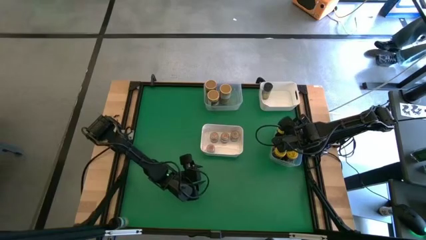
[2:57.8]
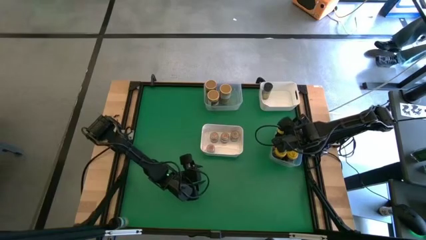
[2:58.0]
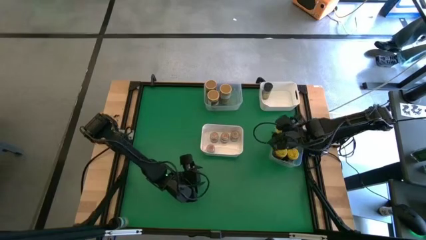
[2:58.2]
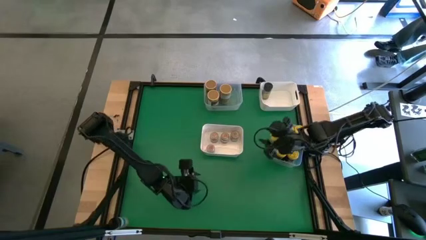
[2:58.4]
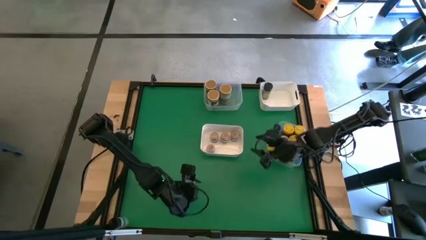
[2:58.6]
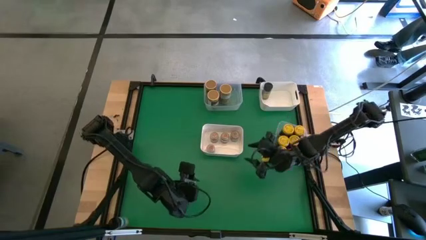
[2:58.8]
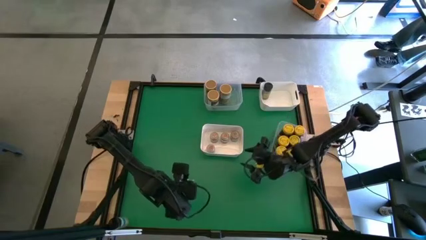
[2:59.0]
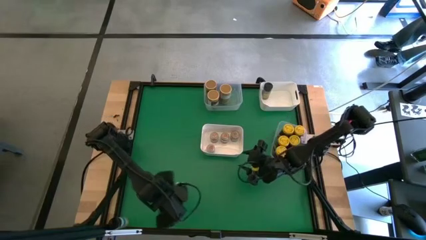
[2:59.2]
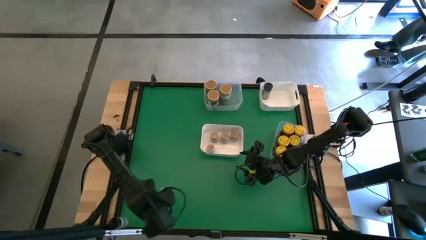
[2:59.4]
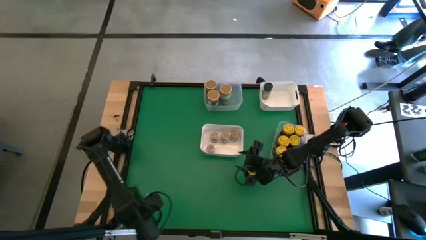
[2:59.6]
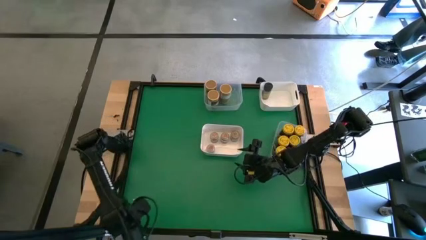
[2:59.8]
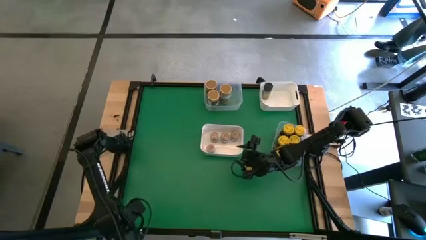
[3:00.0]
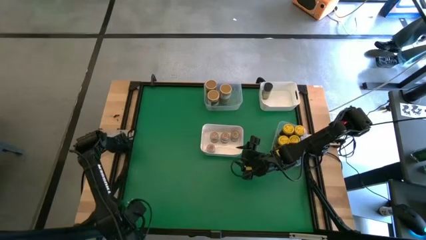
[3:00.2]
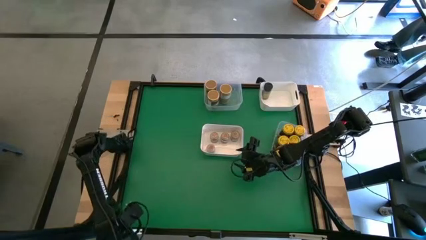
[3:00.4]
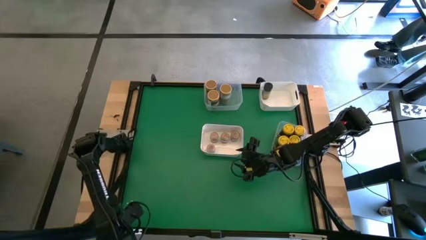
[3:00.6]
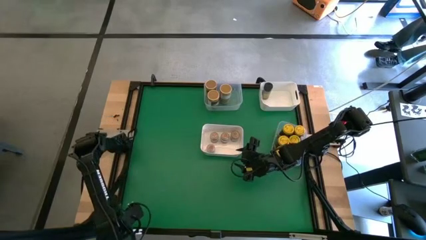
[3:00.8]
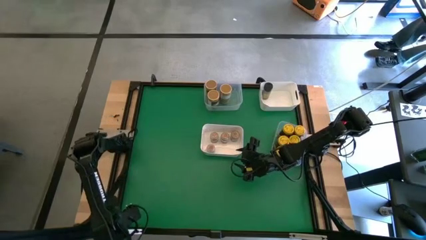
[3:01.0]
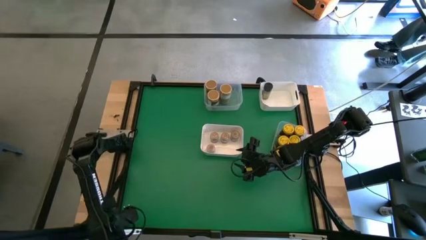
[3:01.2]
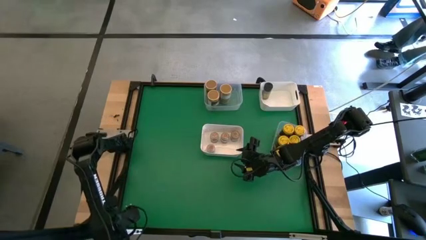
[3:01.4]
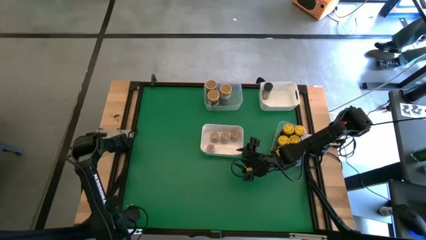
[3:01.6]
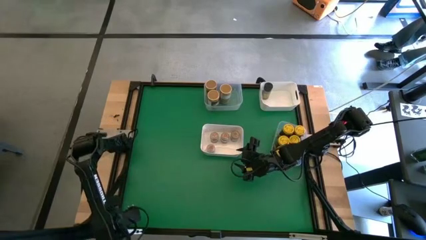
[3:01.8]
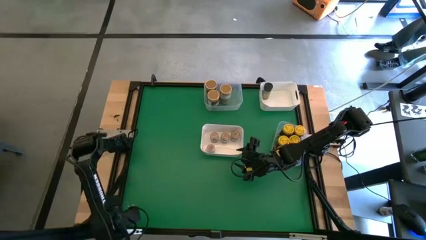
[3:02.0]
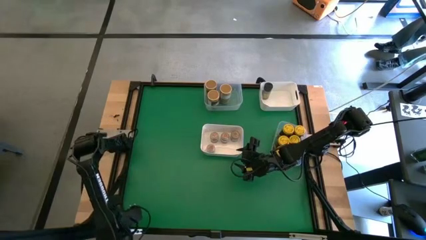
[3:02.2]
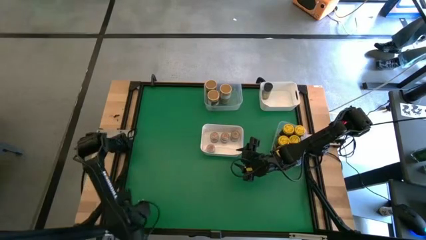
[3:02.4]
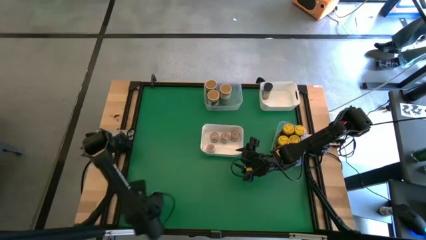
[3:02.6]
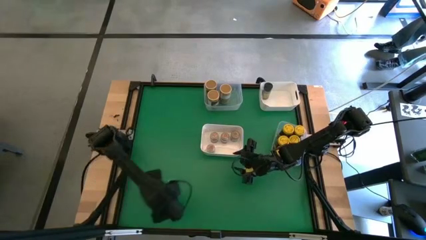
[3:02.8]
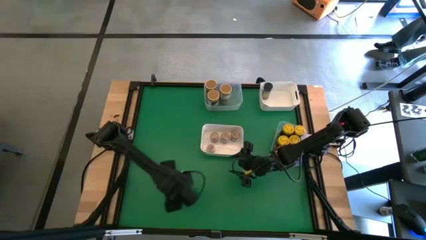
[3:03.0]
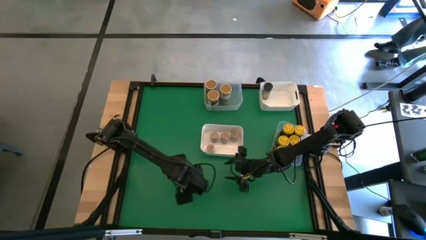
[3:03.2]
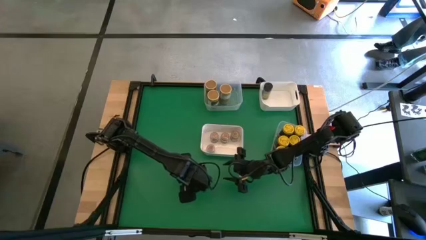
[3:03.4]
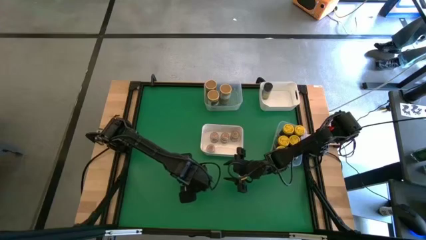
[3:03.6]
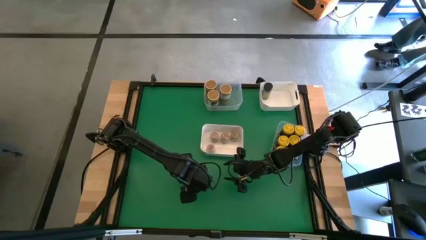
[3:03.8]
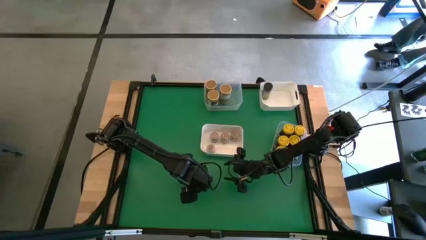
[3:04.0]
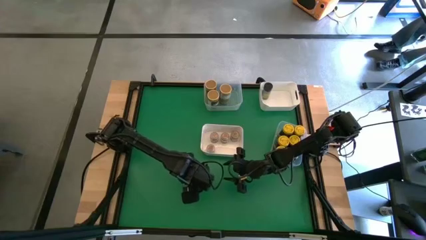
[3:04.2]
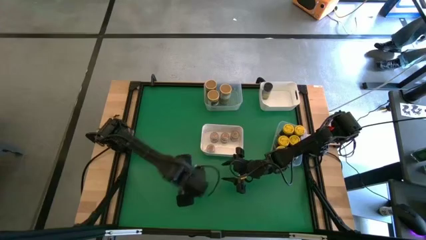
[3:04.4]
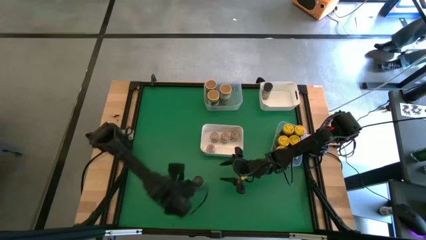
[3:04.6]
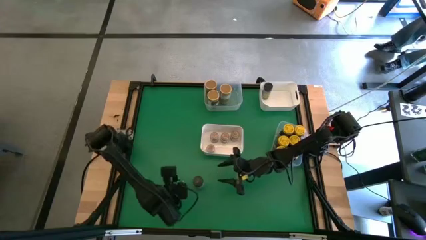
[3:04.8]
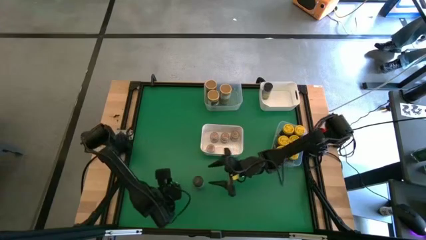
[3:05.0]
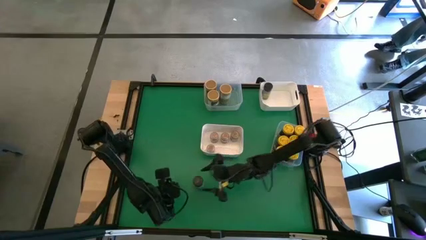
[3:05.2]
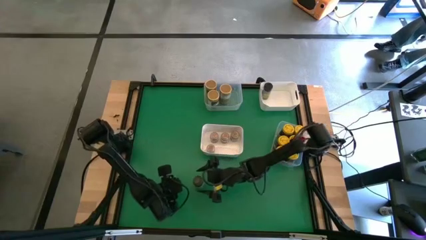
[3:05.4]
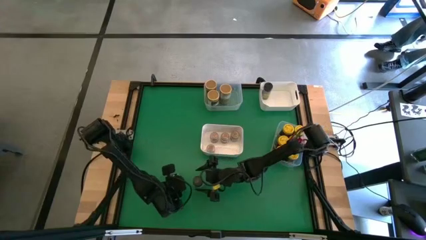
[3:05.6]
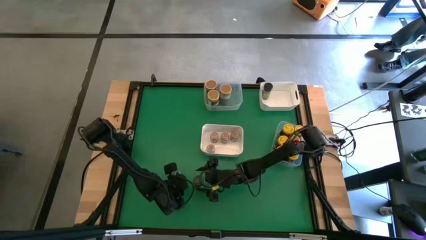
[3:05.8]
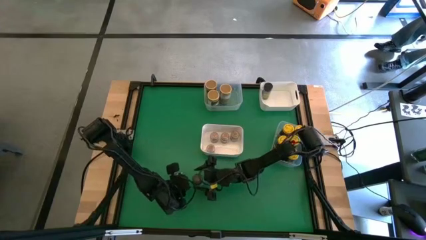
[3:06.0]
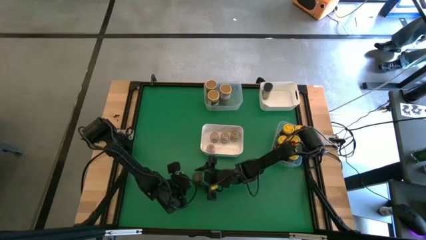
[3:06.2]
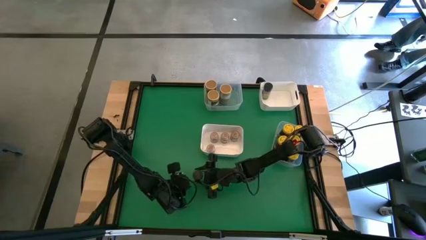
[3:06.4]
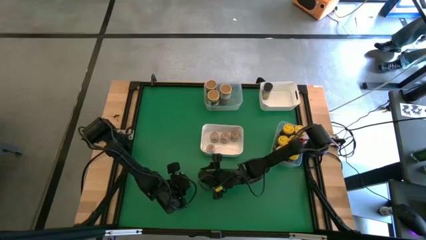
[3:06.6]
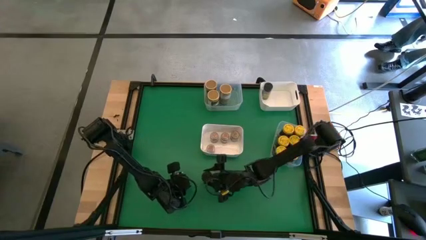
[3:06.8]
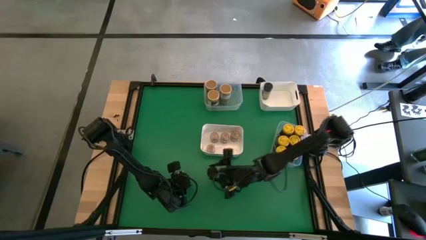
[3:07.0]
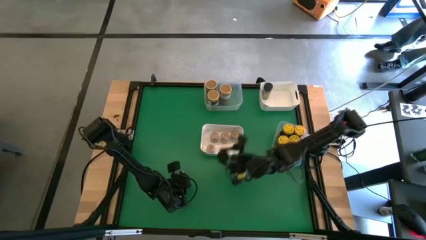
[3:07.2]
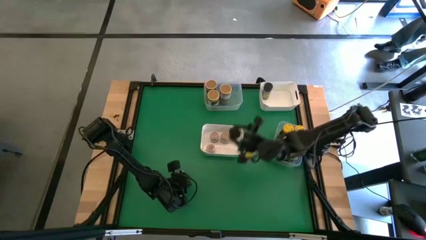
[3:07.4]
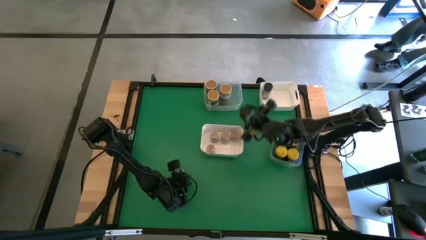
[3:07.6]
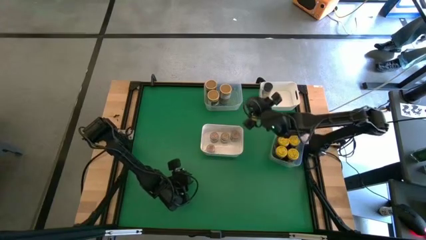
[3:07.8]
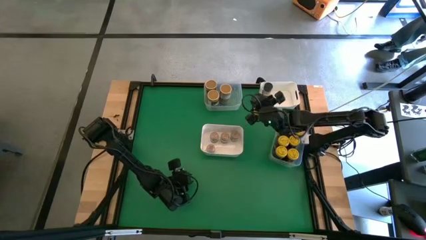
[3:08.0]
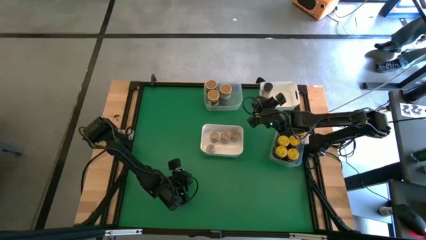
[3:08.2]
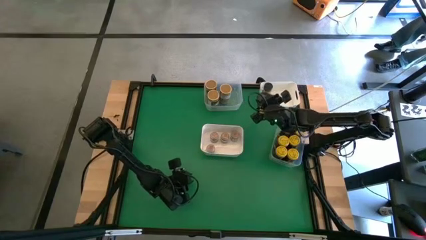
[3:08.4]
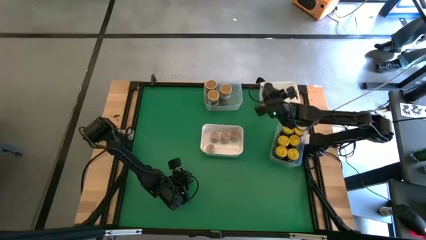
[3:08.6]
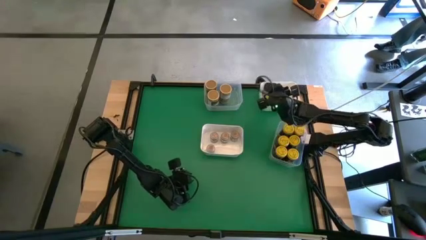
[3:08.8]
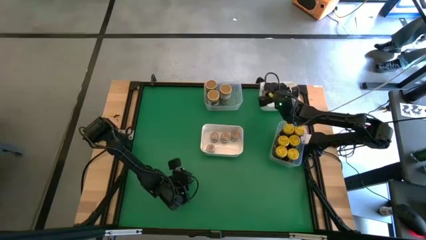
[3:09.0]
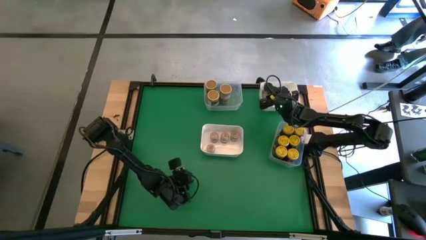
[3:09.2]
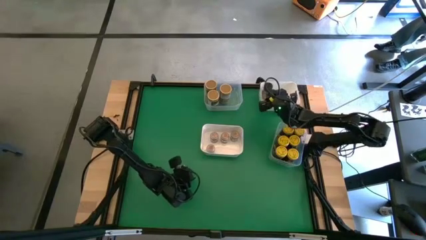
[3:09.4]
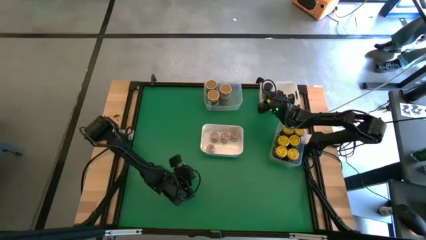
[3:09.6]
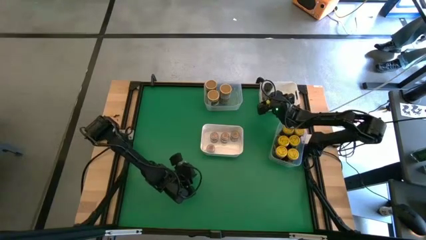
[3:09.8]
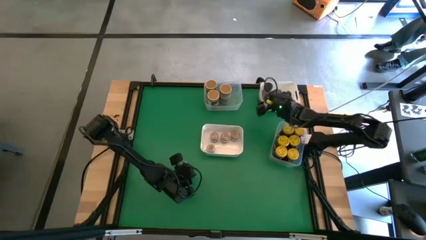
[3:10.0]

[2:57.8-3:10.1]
Task: Sort spices by type
Put the black seasoning bottle into the top white bin

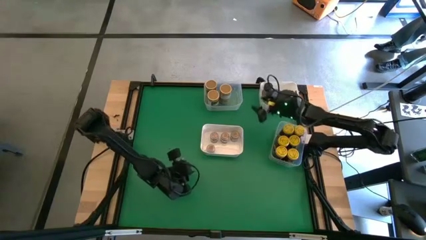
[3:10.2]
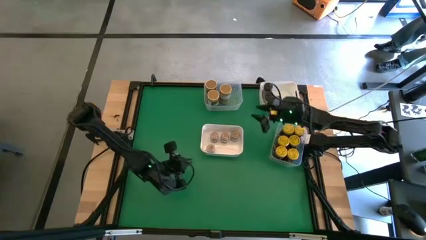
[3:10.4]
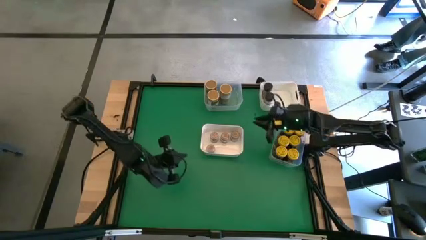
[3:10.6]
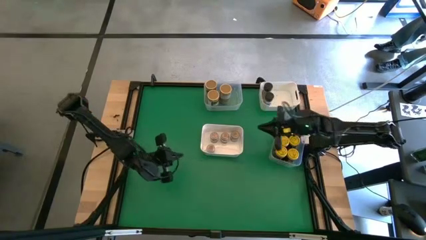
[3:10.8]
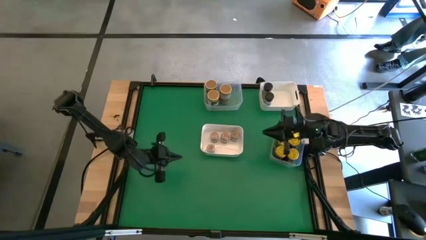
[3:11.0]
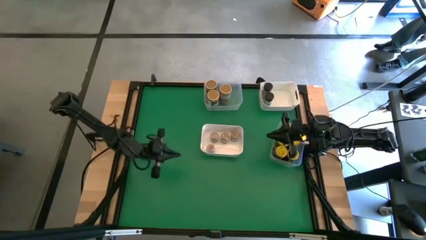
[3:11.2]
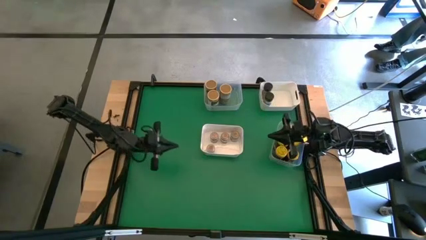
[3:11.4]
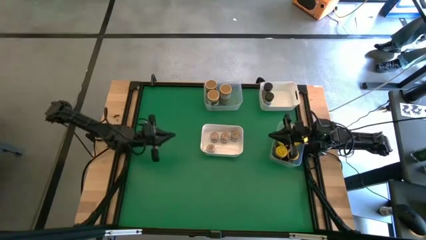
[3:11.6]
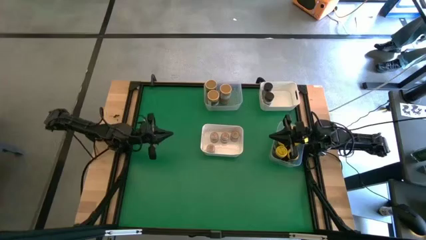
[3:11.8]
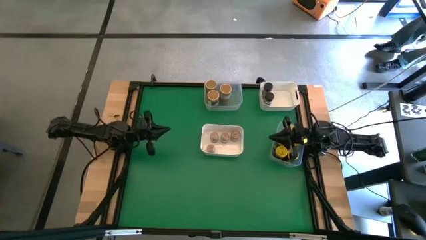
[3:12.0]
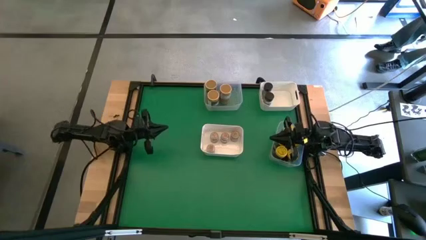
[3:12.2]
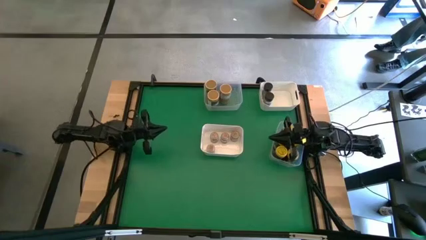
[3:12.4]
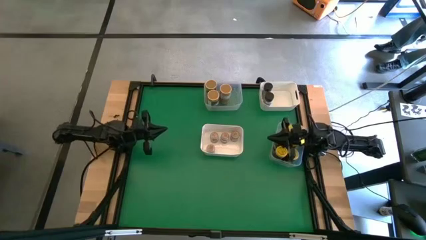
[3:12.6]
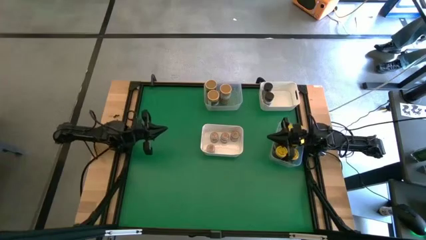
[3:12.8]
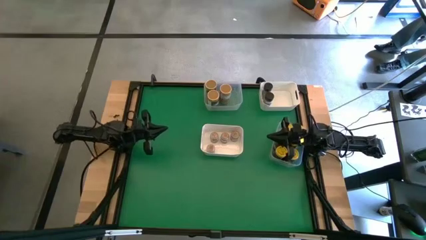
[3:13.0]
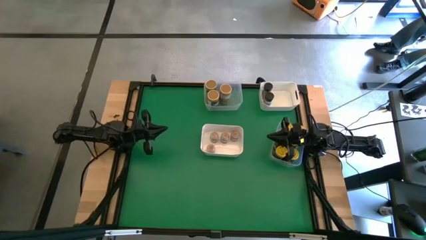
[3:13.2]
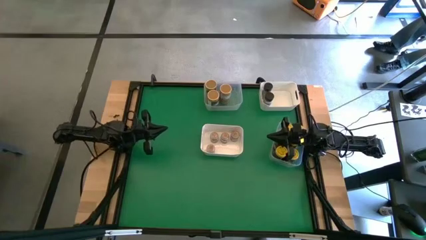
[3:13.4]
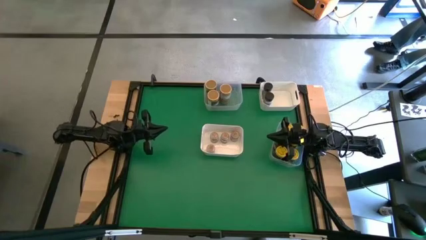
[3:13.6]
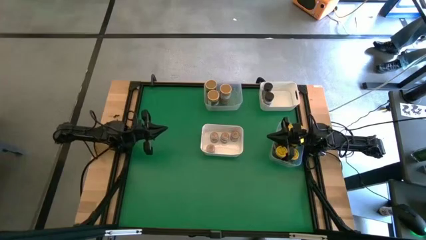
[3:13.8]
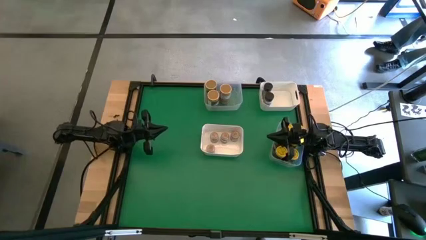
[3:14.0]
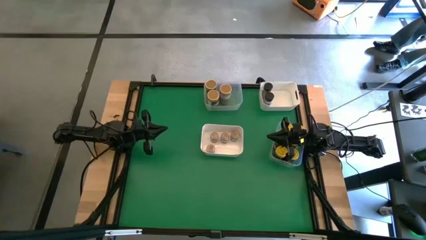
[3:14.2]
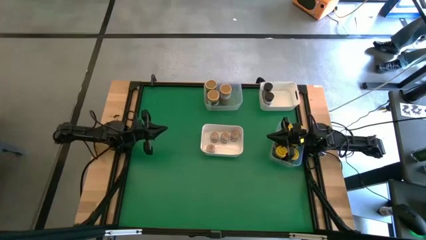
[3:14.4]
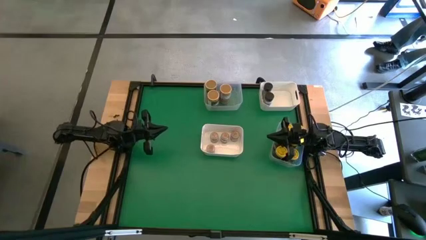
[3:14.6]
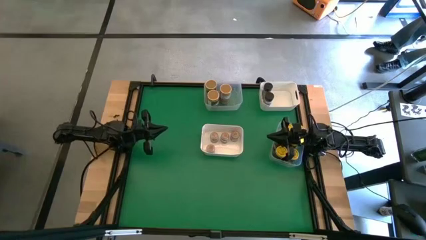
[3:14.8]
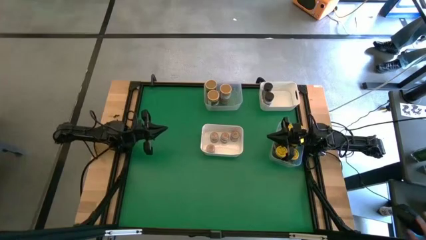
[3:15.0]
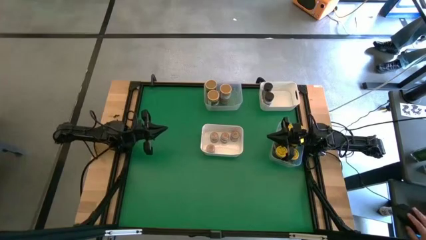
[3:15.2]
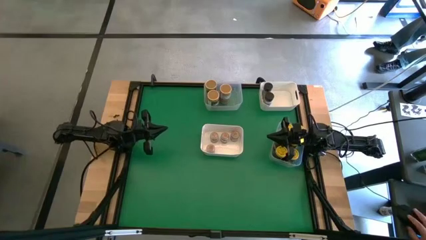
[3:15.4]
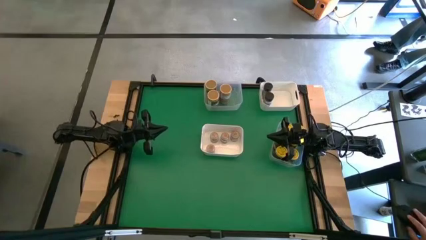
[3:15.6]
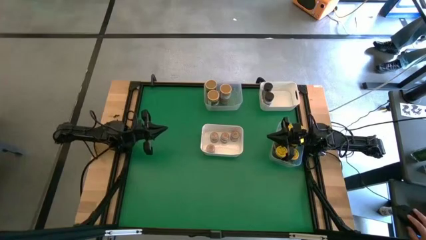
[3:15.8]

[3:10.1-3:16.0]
Return to Home Position
